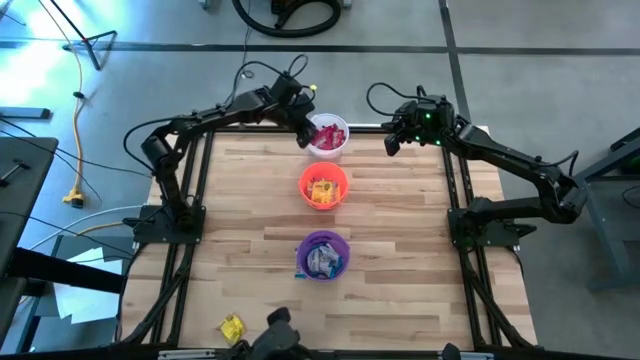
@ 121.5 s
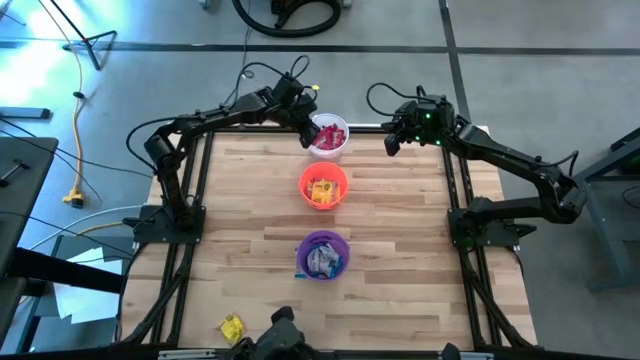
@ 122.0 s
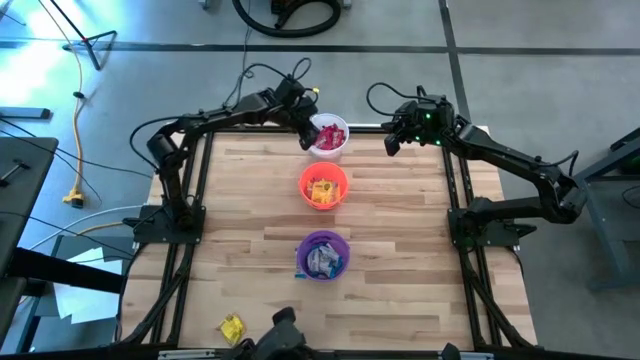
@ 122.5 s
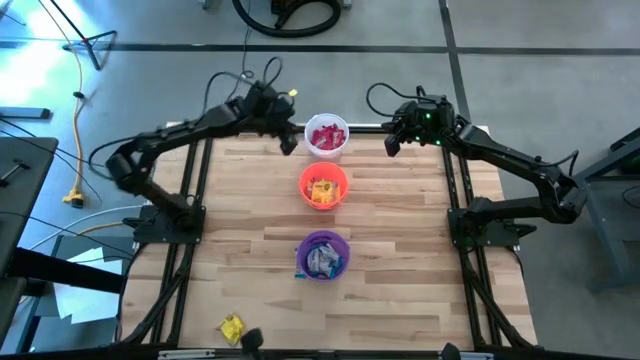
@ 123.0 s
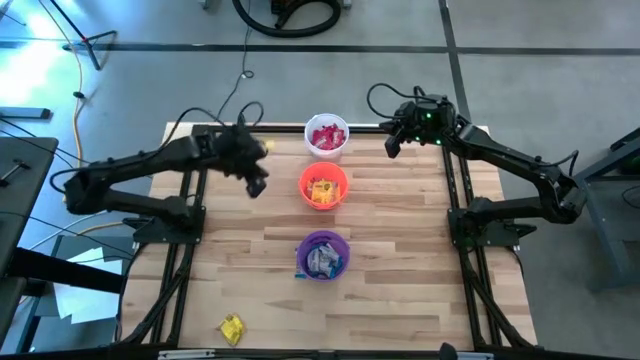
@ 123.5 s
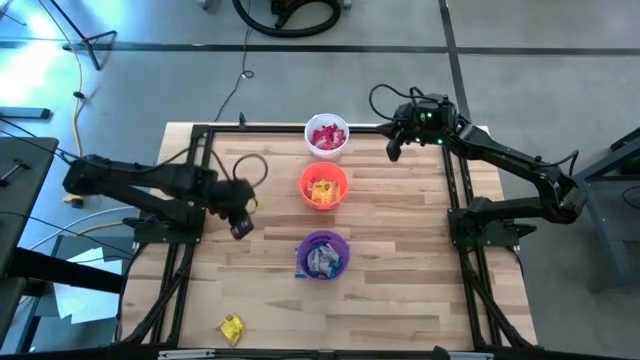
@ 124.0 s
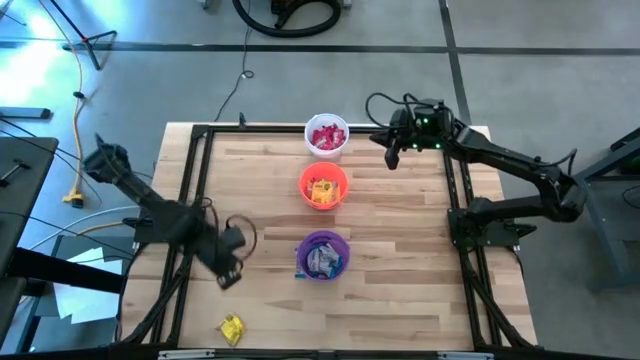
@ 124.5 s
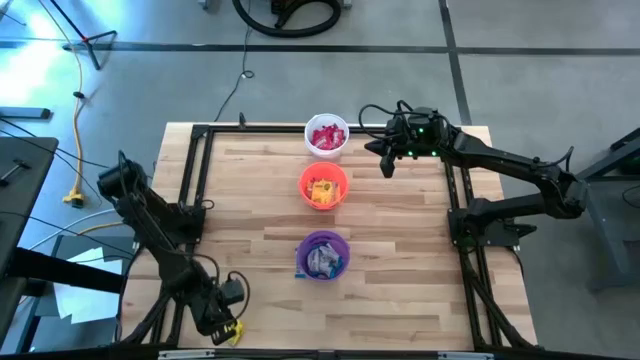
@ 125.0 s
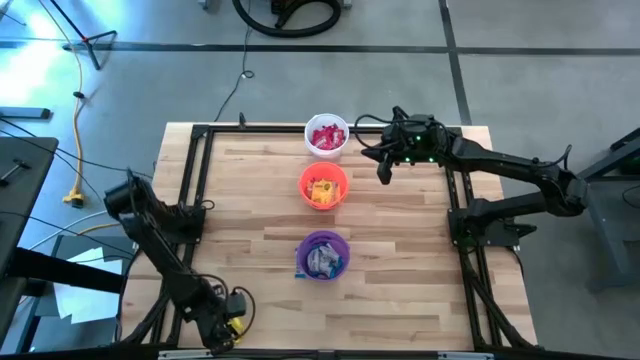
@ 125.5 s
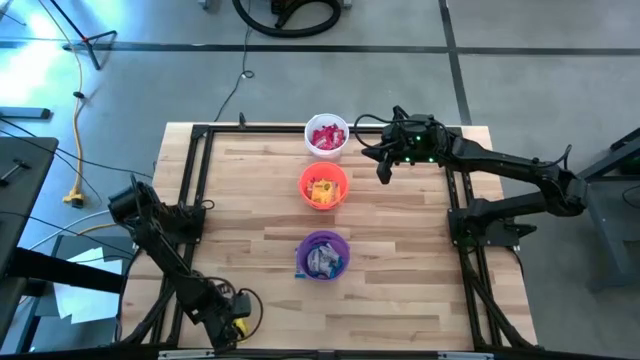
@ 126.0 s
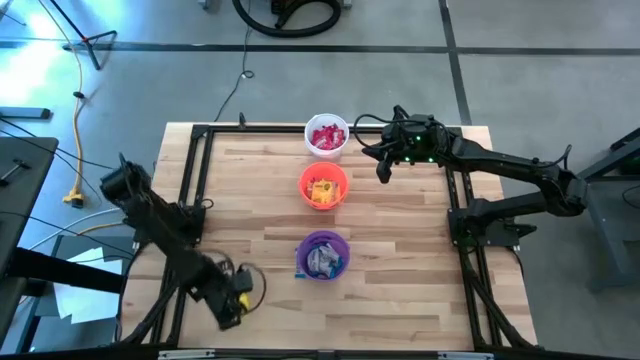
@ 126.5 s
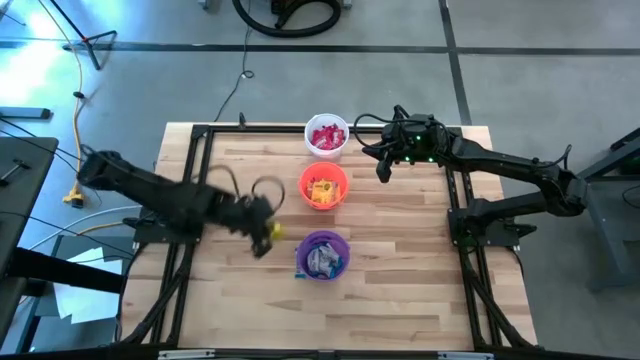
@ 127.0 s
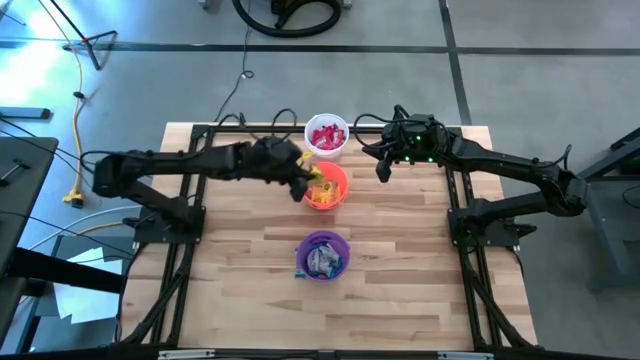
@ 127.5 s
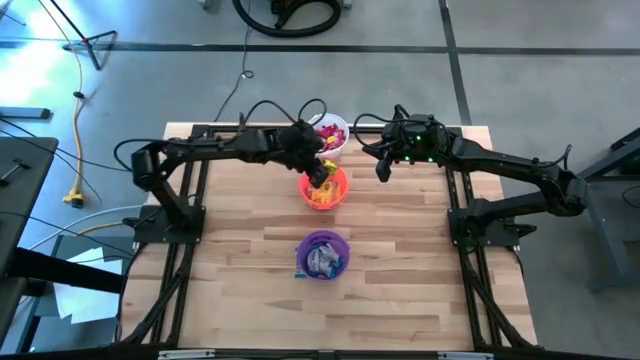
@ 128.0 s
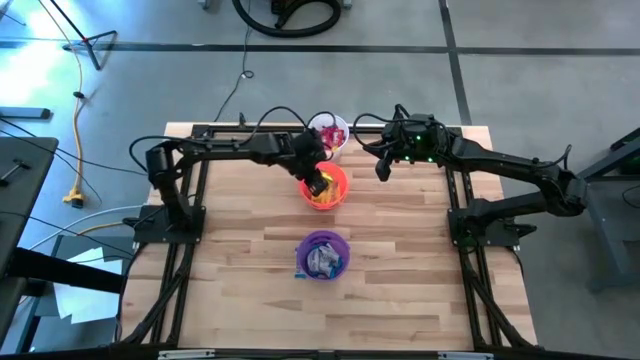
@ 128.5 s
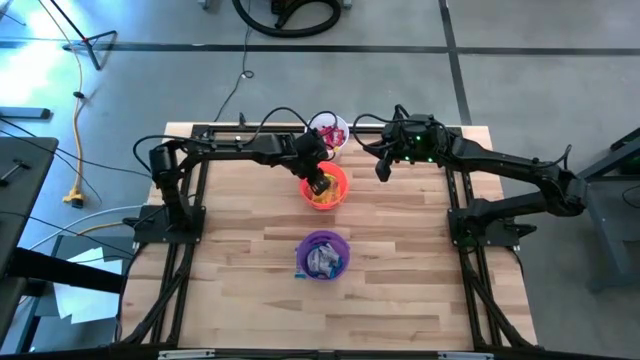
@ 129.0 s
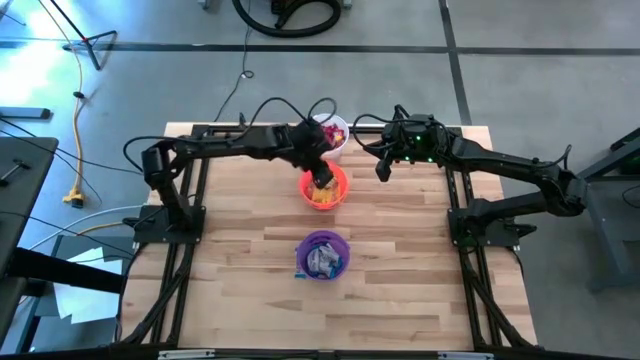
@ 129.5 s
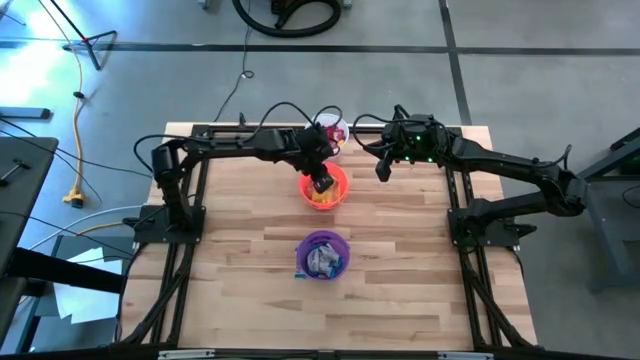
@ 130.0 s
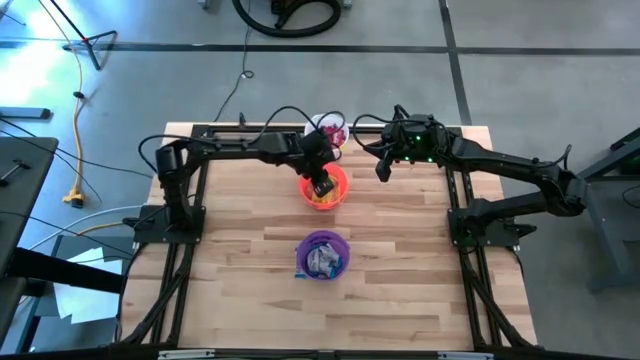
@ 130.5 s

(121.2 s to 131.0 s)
Task: Sort candy
Put the yellow candy into the orange bucket

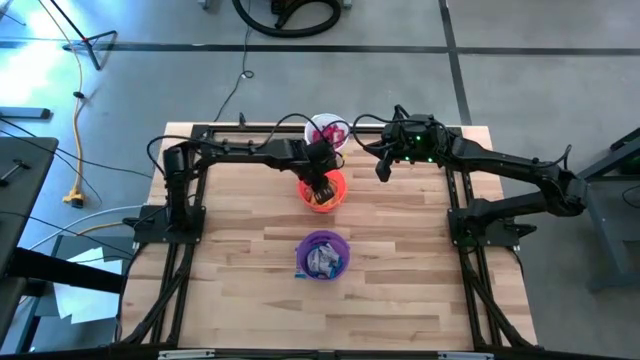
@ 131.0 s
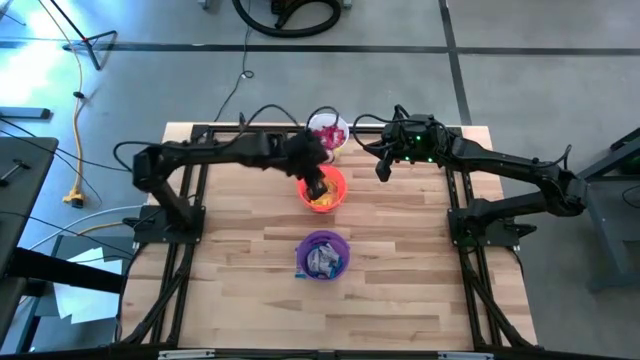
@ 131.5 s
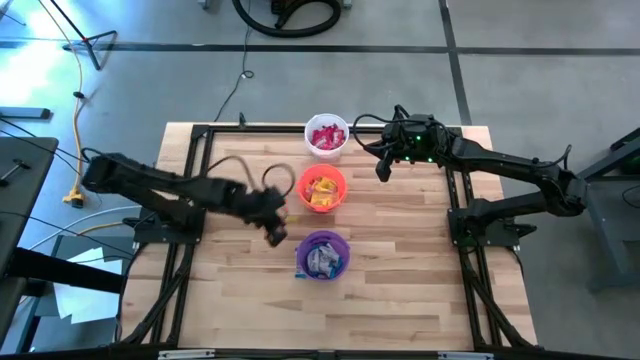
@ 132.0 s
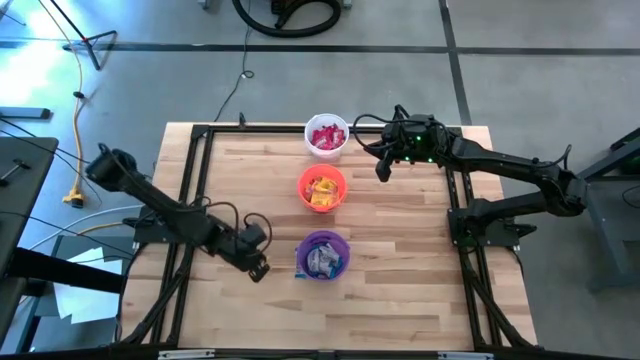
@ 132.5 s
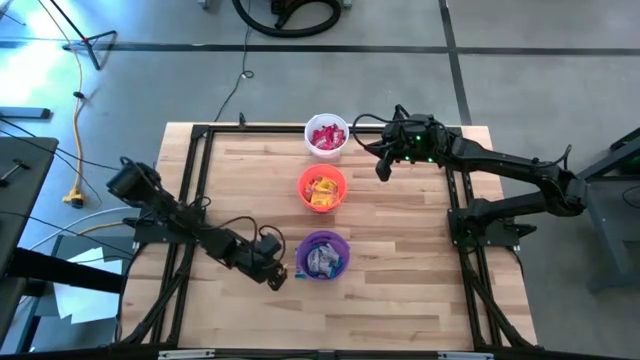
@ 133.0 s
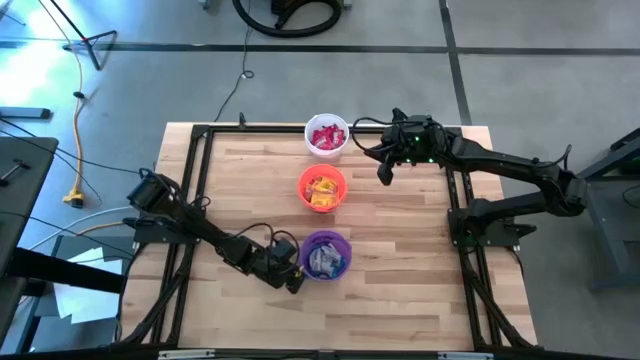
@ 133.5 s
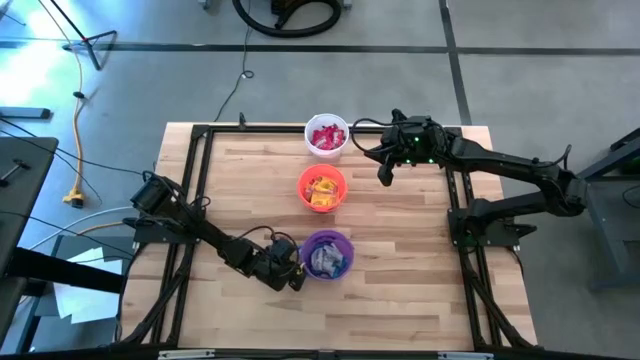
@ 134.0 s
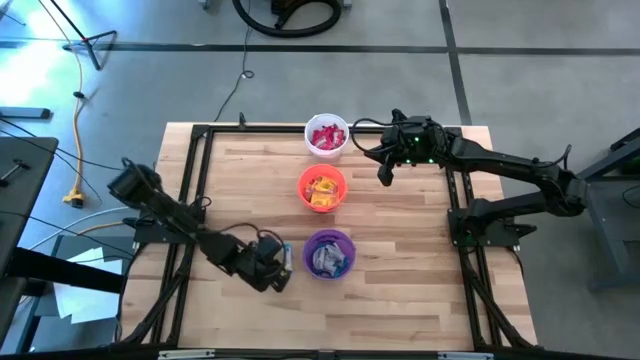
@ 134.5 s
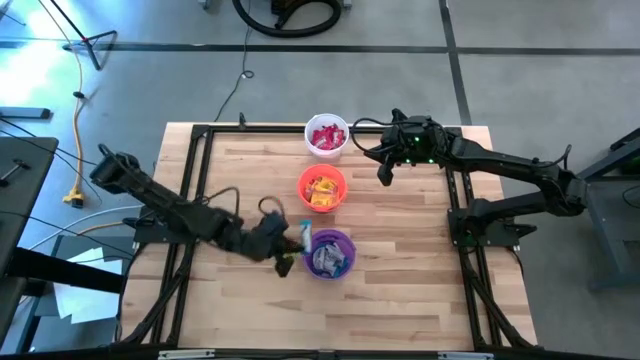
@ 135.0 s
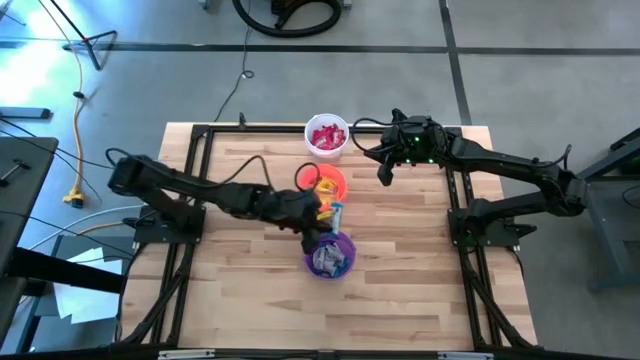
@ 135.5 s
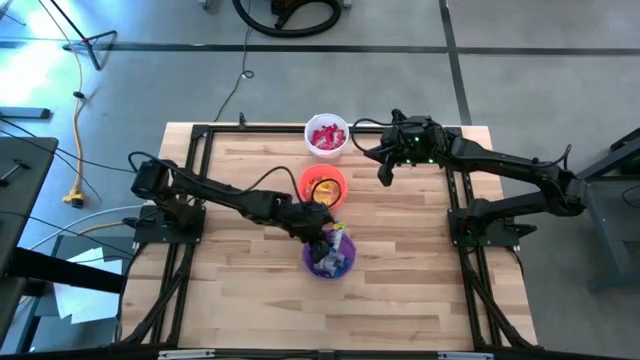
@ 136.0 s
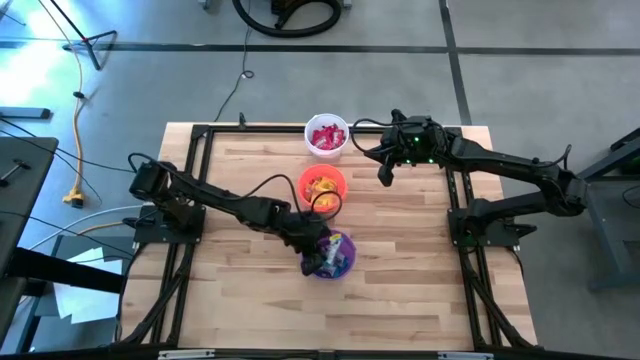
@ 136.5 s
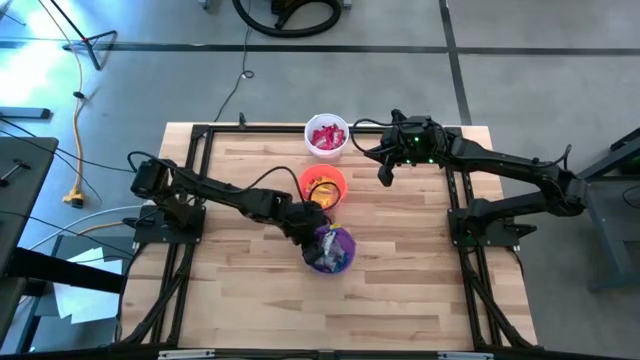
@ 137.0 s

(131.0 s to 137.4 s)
Put the white chocolate into the violet bucket

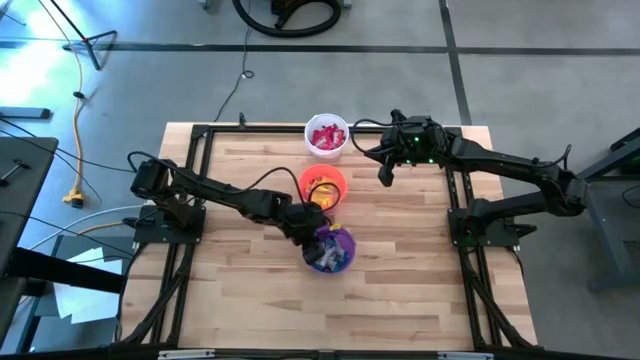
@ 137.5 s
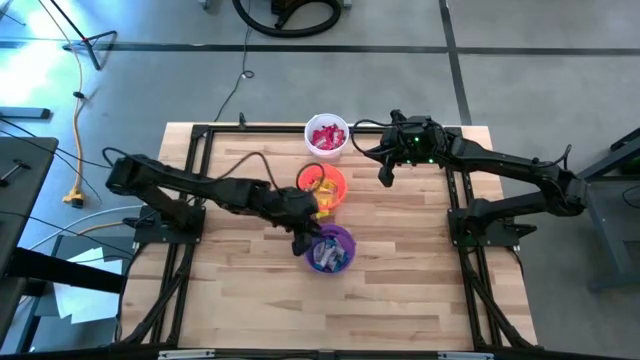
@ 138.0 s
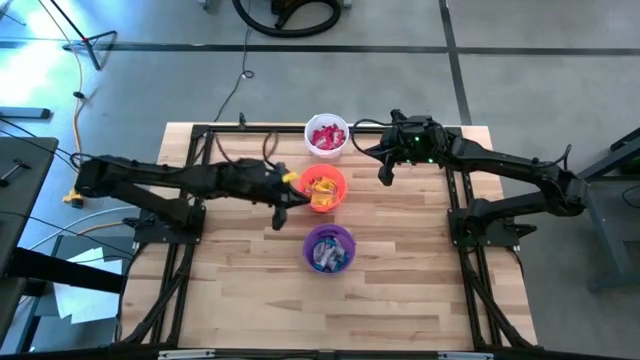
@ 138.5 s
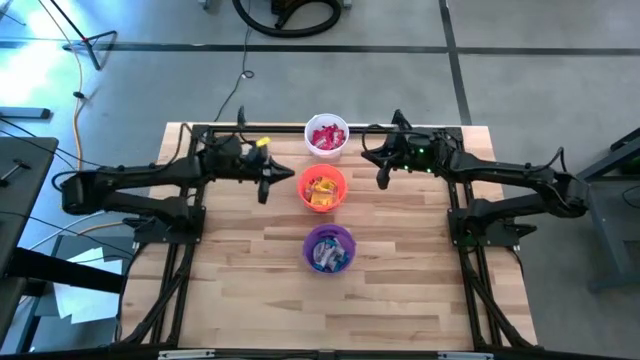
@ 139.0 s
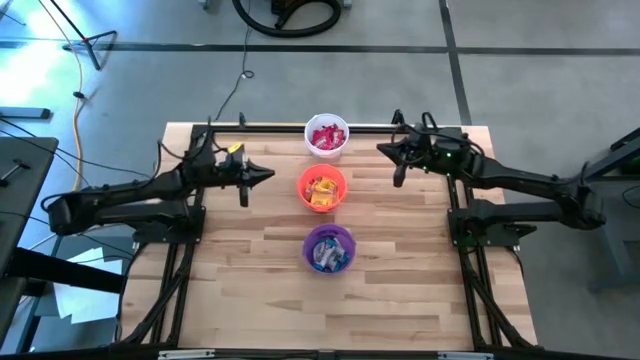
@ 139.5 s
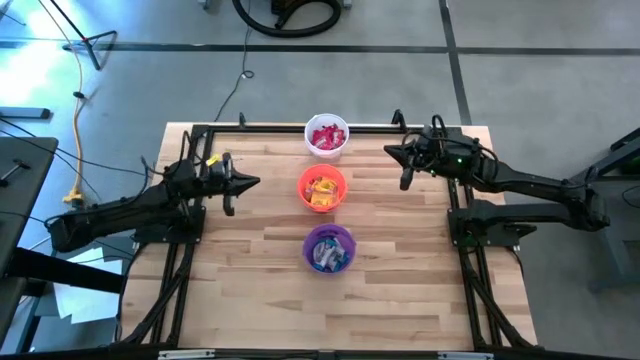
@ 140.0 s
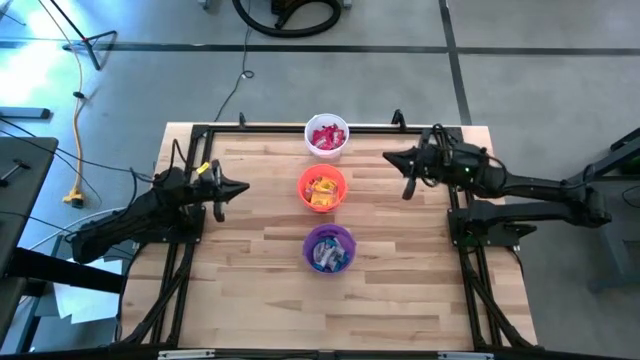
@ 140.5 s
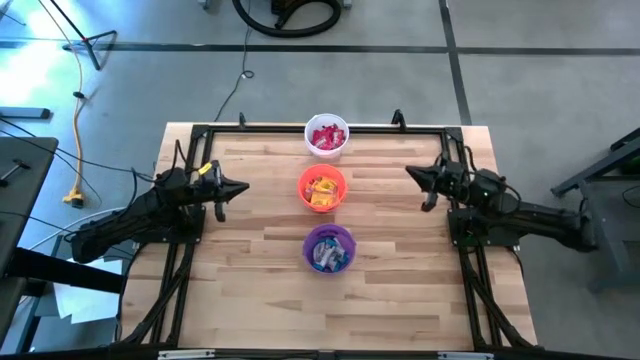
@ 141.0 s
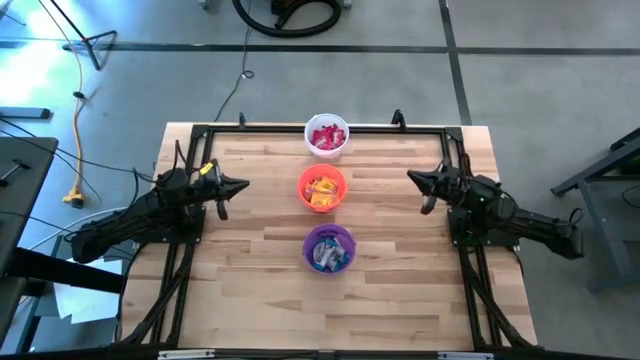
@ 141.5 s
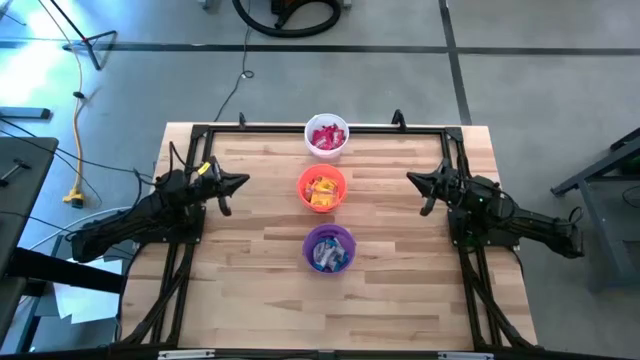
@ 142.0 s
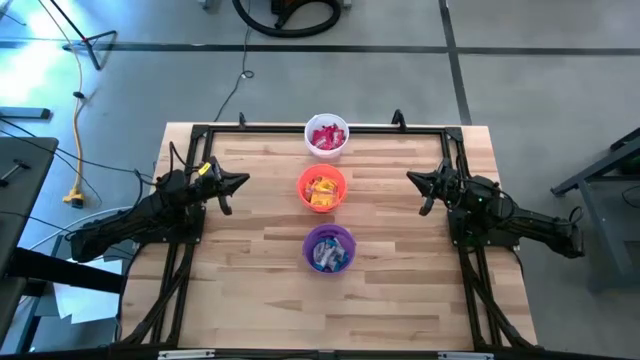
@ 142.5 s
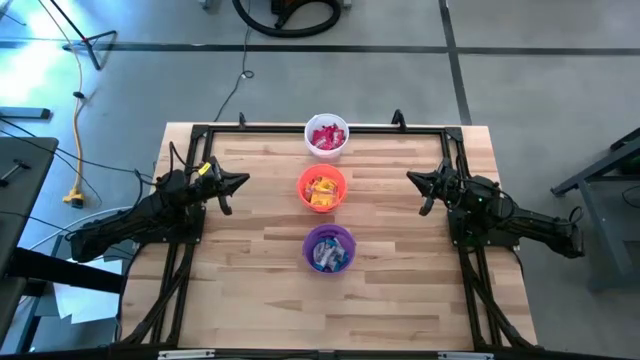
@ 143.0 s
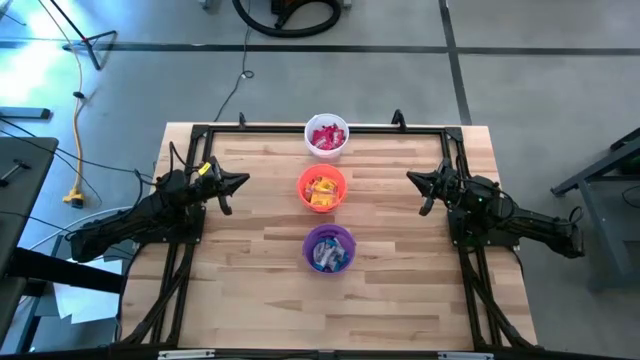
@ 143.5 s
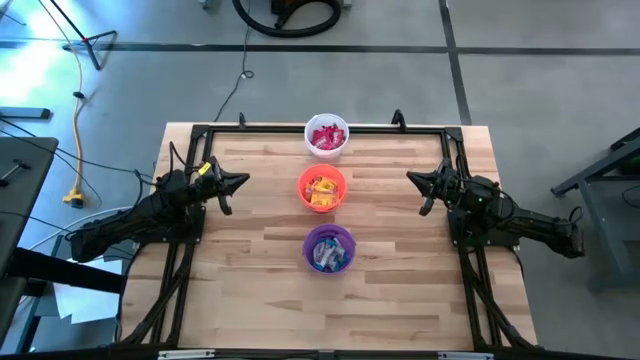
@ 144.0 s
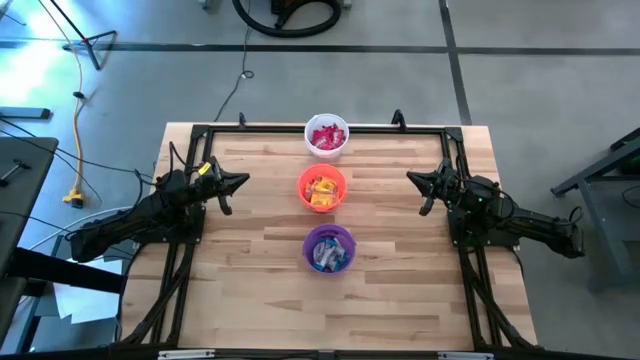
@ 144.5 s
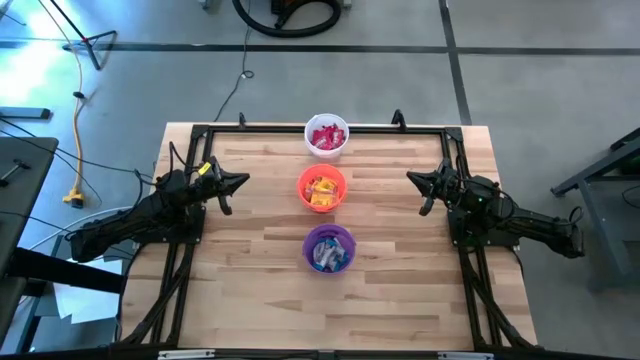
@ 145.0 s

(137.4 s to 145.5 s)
Return to Home Position
